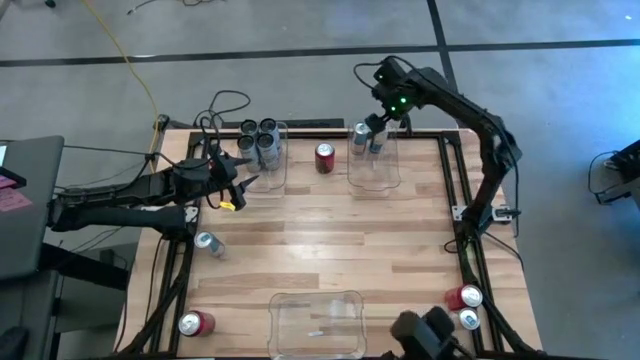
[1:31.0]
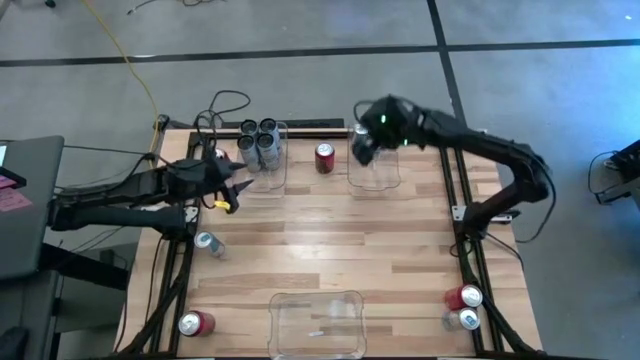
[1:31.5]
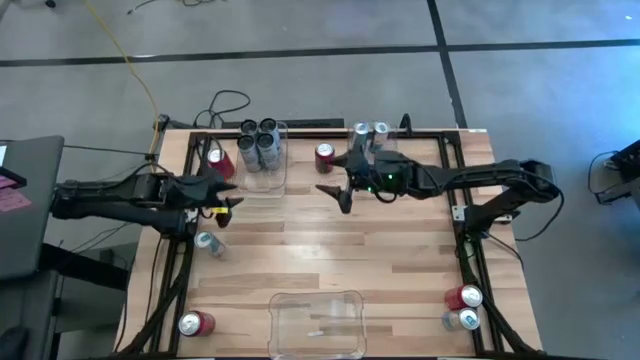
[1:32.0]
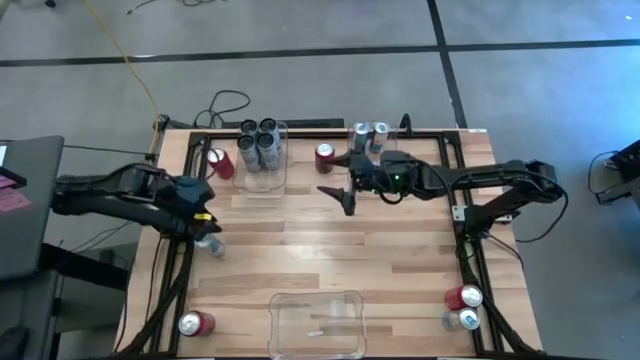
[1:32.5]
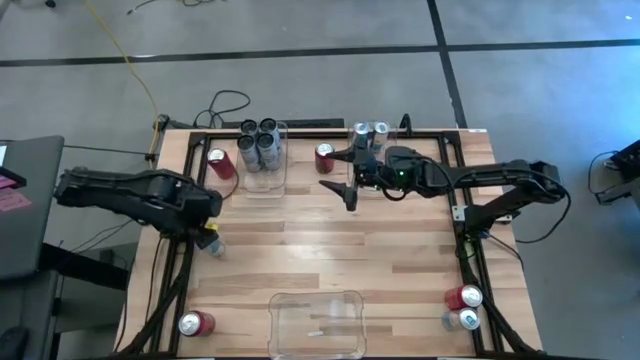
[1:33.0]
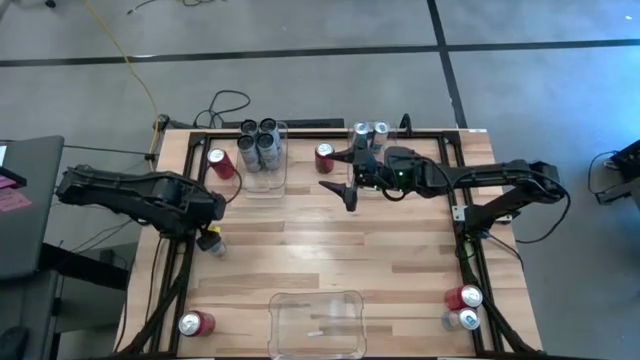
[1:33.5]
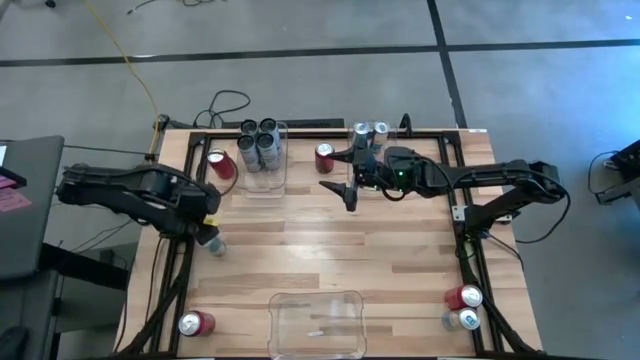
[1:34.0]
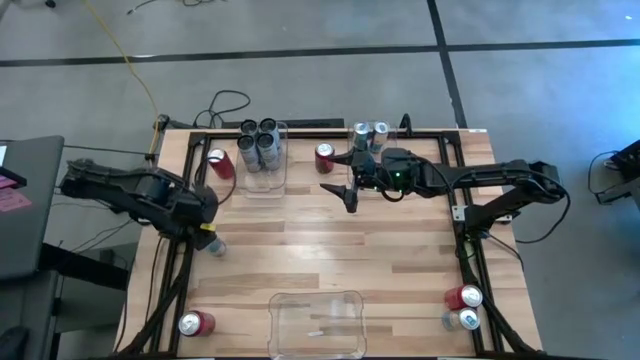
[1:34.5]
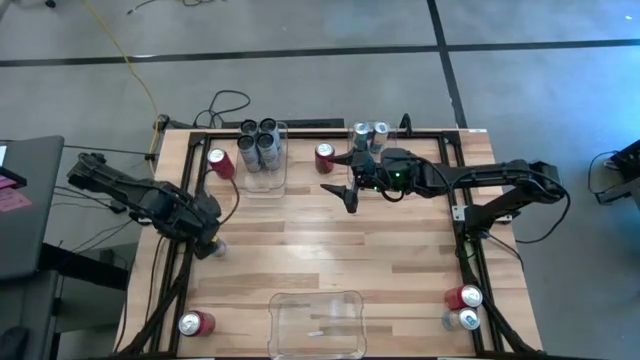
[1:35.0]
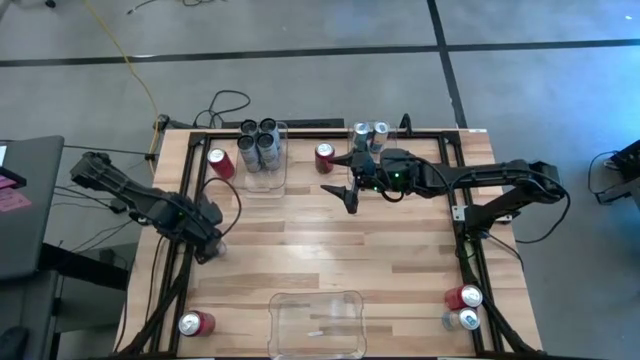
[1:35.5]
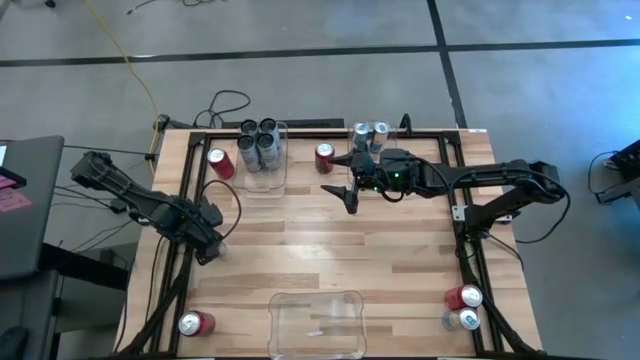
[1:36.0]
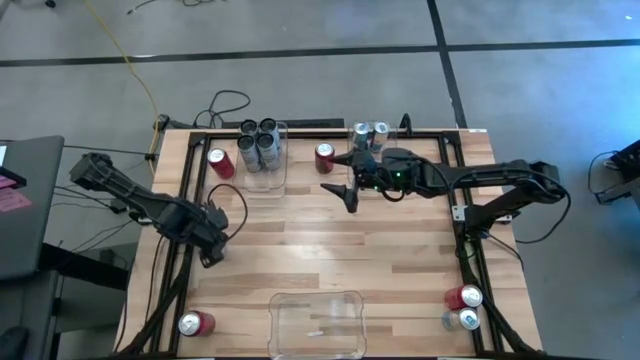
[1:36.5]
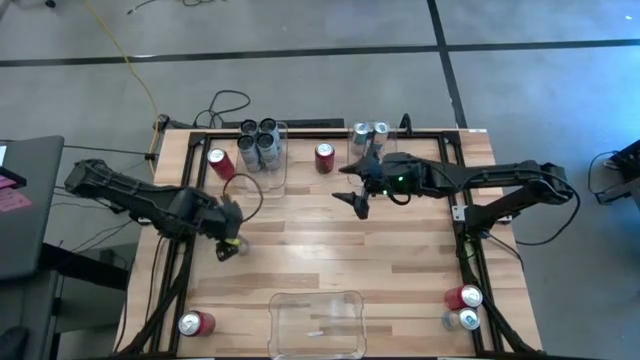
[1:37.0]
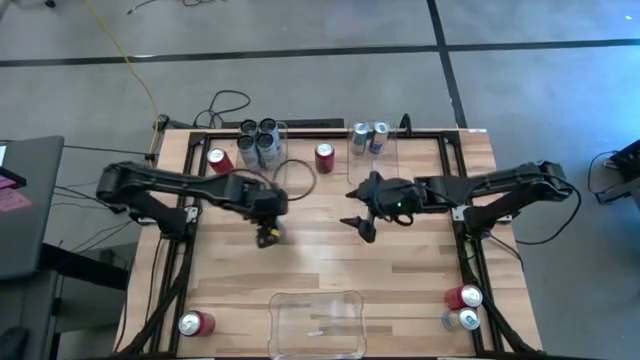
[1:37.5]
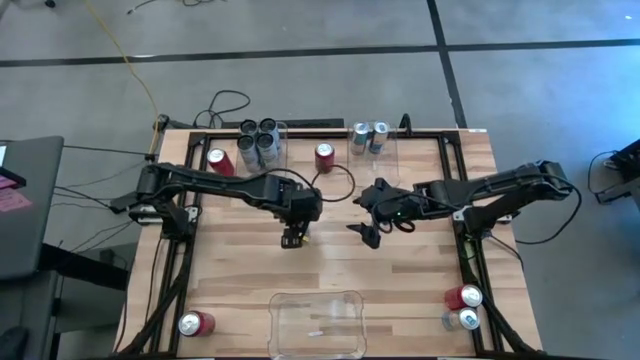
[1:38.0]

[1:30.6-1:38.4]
Task: Sort soda cans
Put the left blue soda can into the top right transparent bin

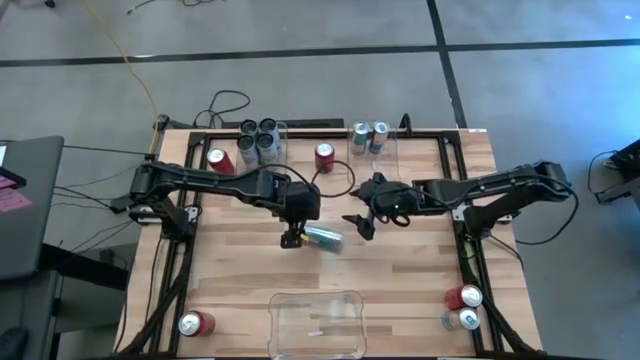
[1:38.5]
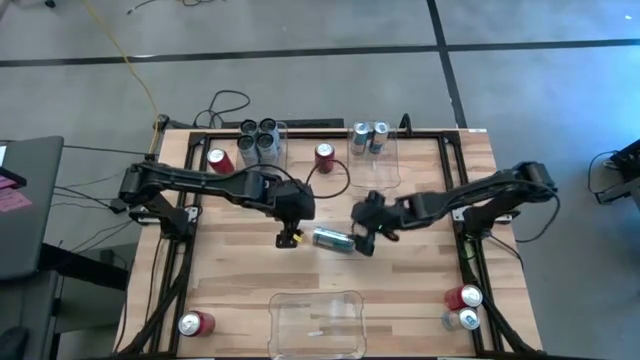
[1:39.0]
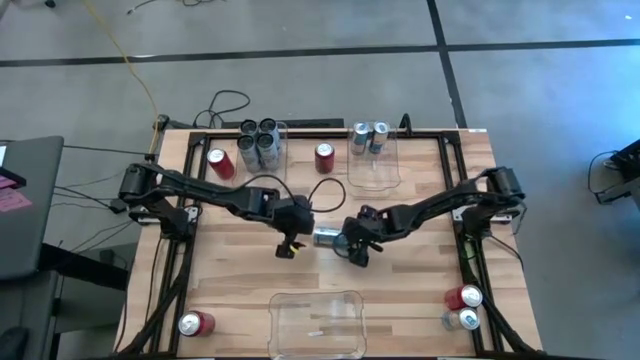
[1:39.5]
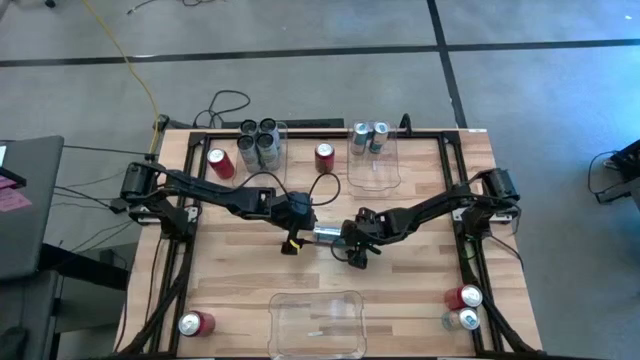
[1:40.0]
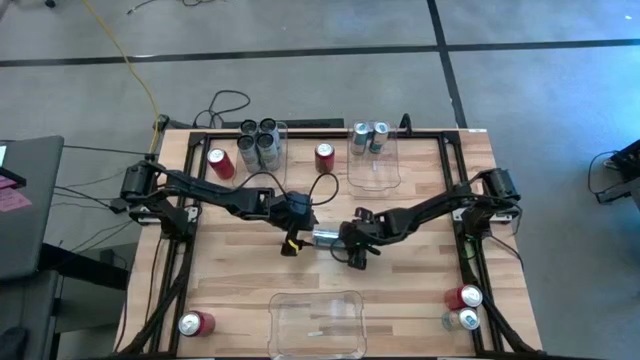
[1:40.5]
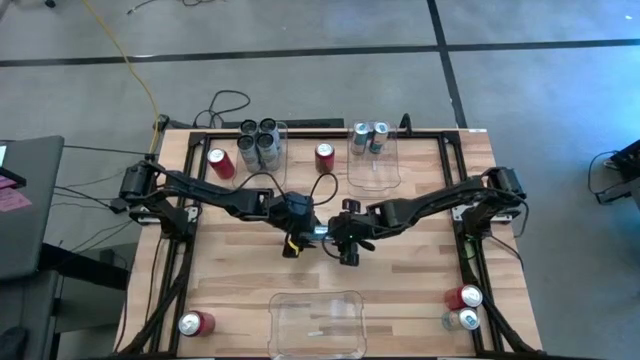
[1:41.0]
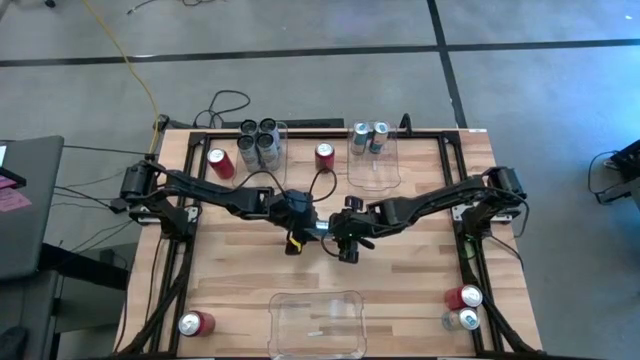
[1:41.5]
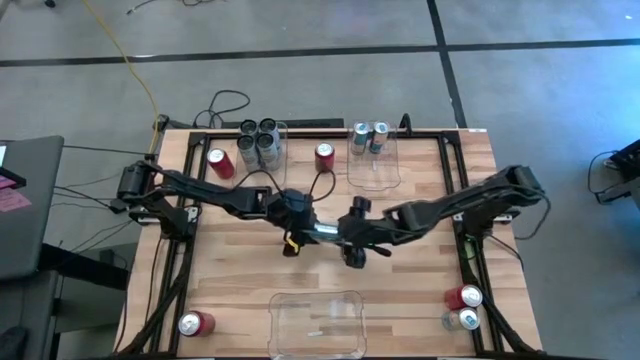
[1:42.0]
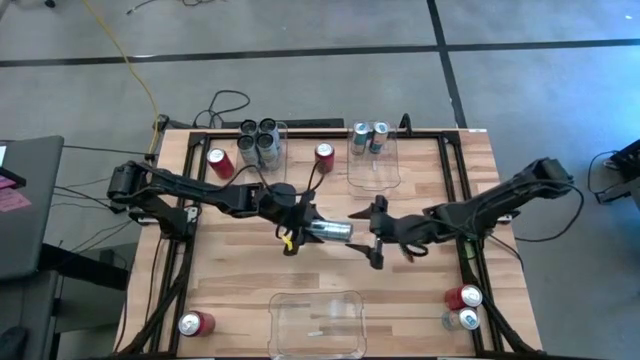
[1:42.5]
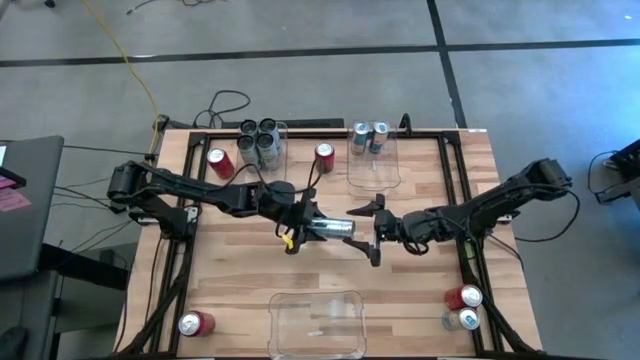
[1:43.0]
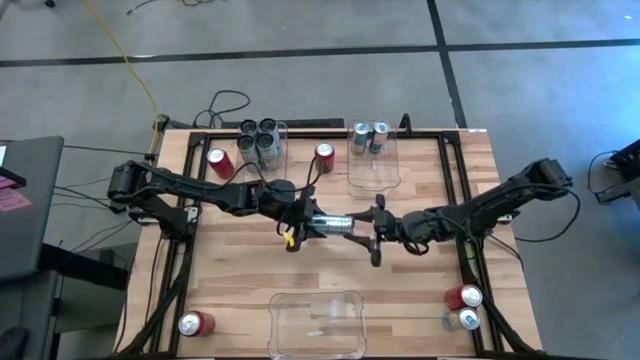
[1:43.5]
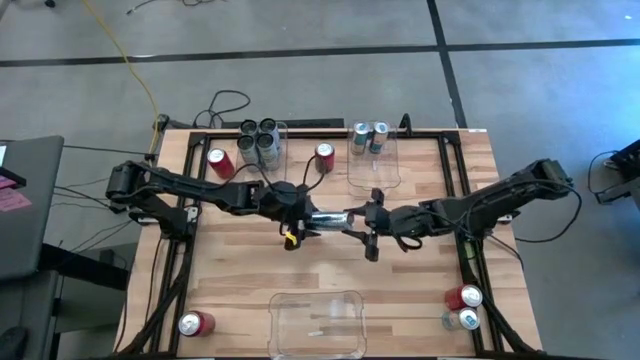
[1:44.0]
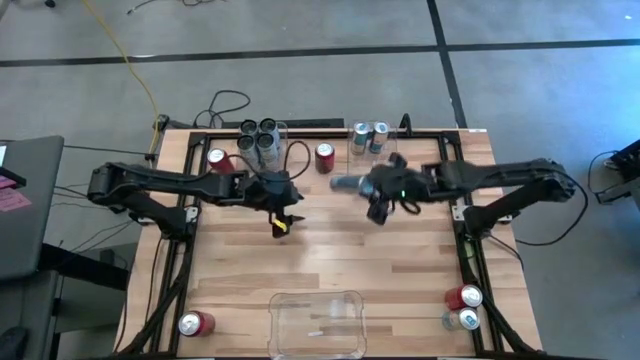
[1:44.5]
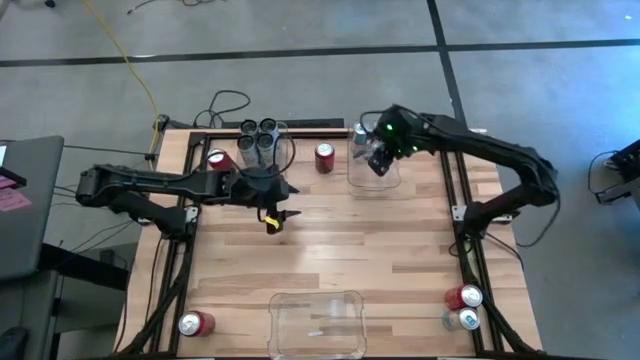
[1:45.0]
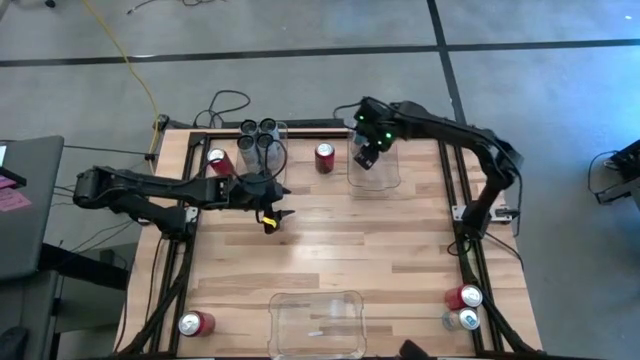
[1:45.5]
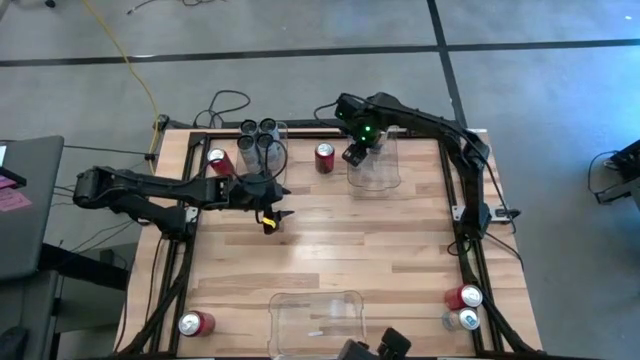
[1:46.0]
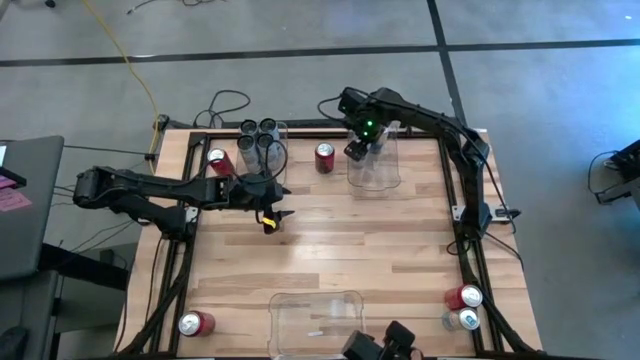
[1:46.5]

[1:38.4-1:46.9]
Put the left blue soda can into the top right transparent bin

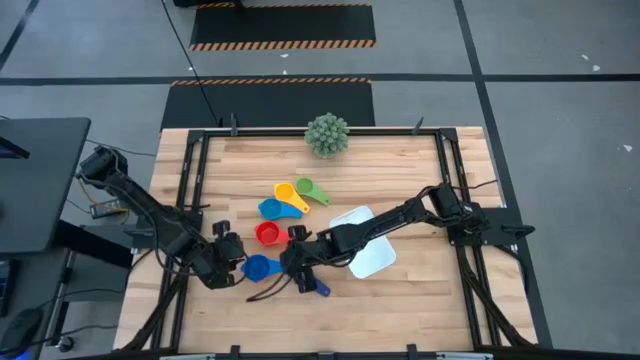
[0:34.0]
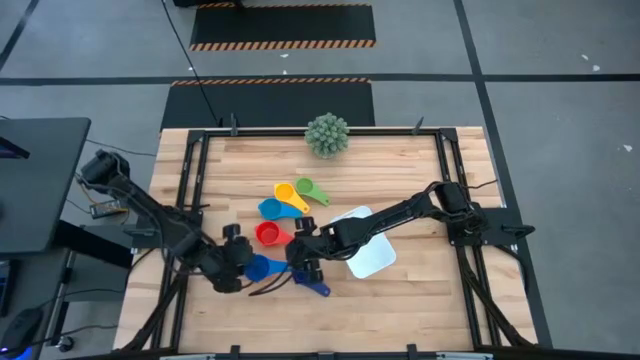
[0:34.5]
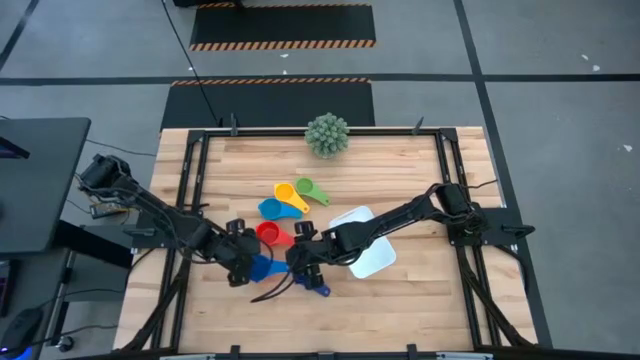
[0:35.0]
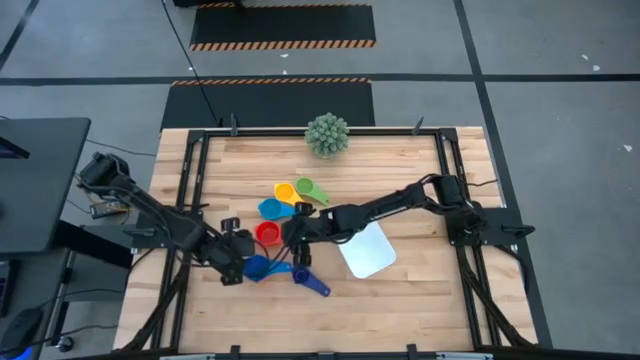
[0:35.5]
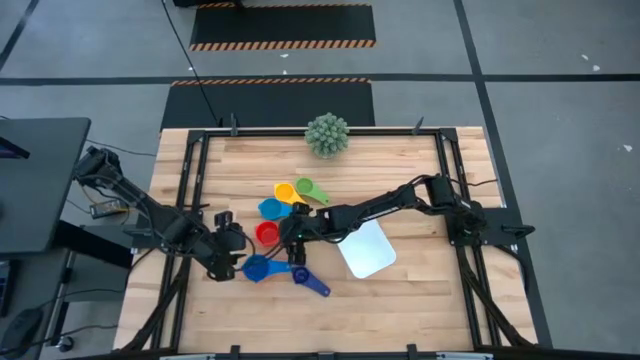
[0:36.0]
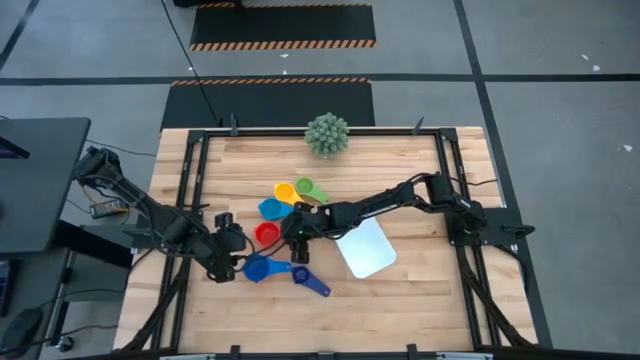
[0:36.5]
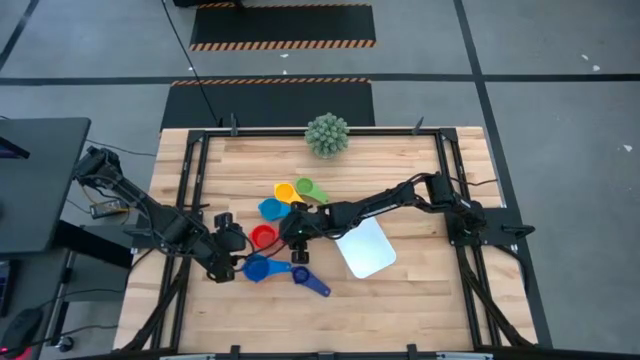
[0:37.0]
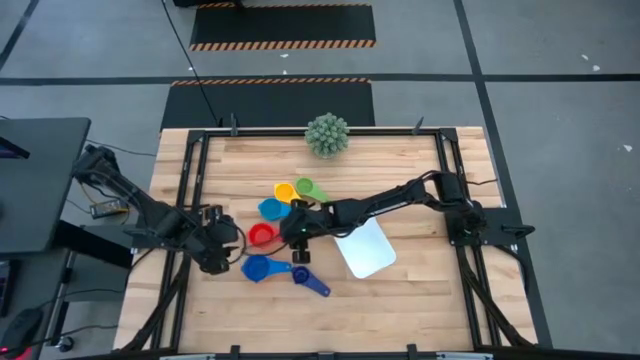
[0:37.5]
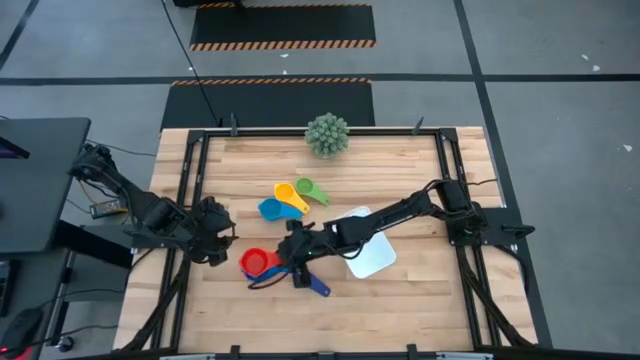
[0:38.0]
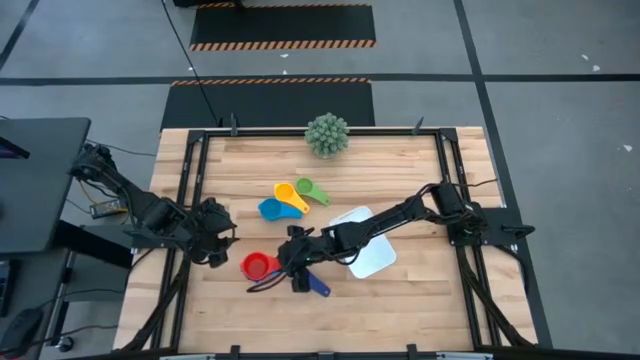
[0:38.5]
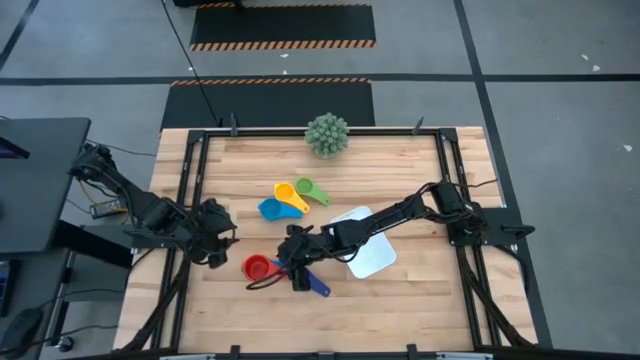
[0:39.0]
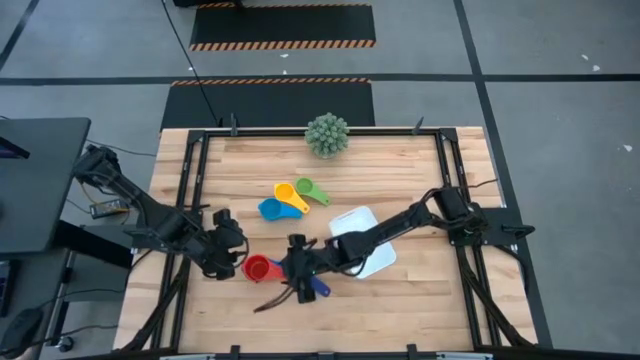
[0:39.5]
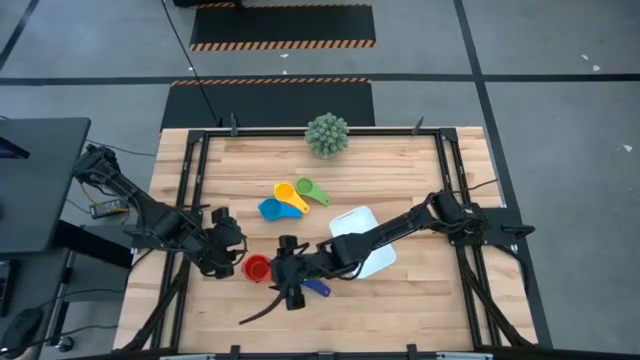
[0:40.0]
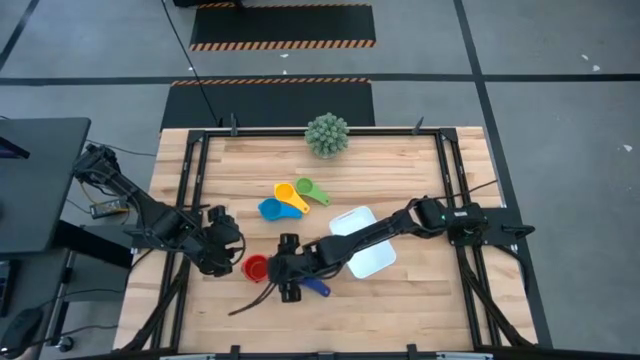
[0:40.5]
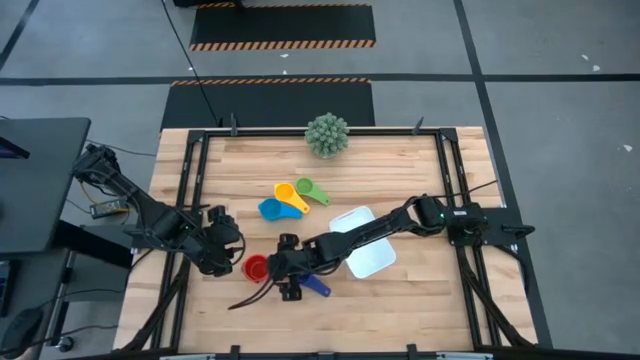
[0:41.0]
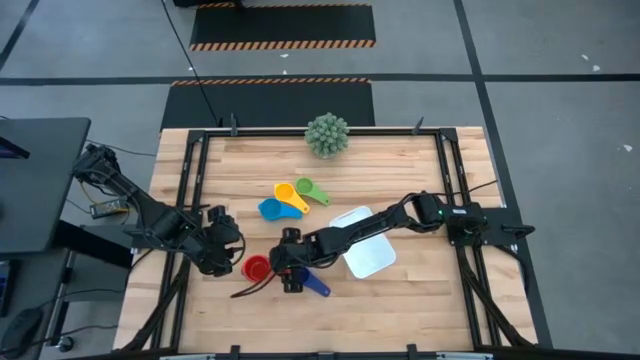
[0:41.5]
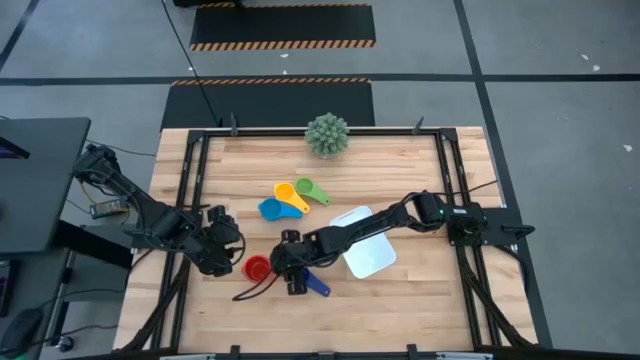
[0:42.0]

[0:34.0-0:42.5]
Task: Nest measuring cups in basket
Stack the red measuring cup on top of the blue measuring cup
